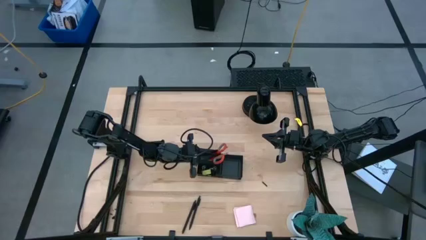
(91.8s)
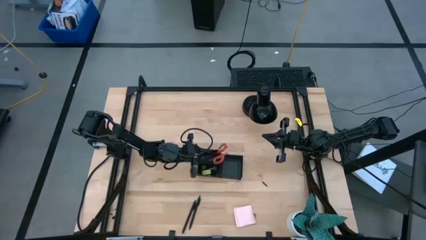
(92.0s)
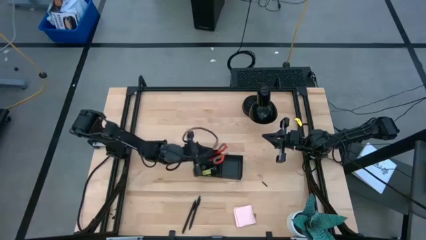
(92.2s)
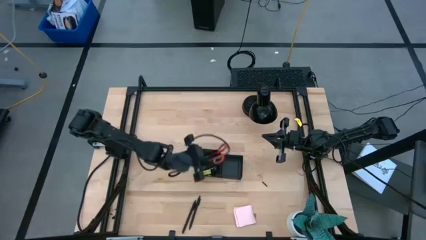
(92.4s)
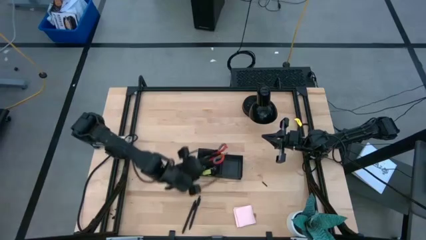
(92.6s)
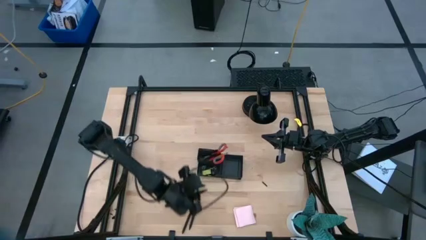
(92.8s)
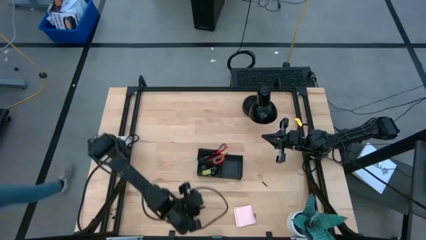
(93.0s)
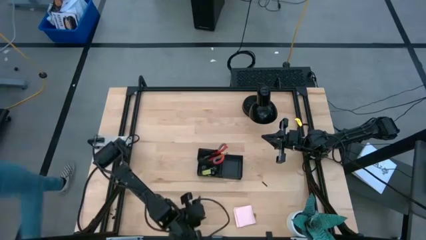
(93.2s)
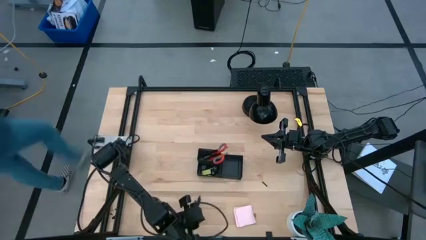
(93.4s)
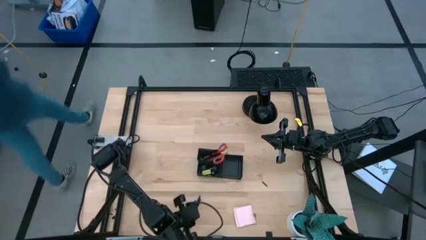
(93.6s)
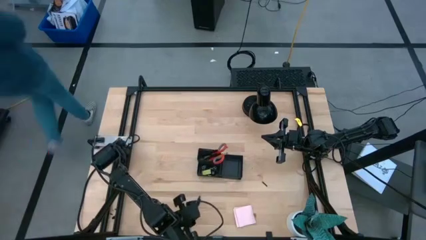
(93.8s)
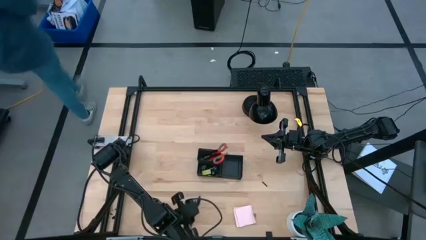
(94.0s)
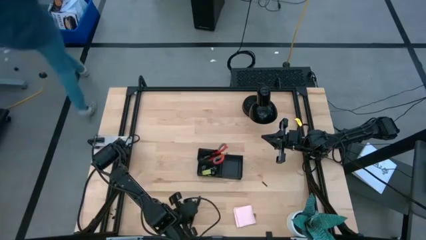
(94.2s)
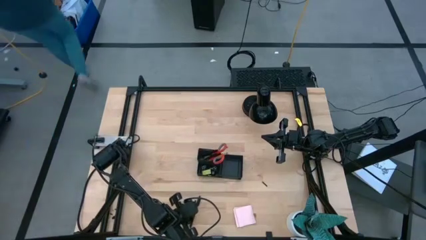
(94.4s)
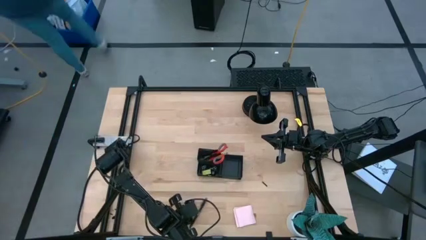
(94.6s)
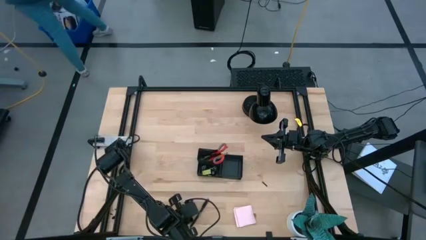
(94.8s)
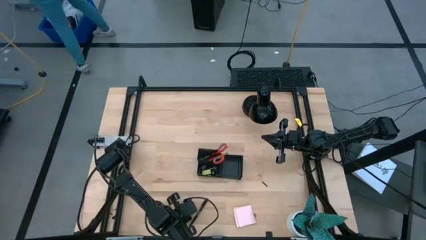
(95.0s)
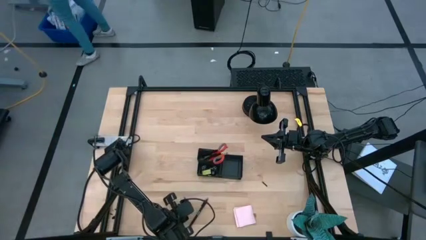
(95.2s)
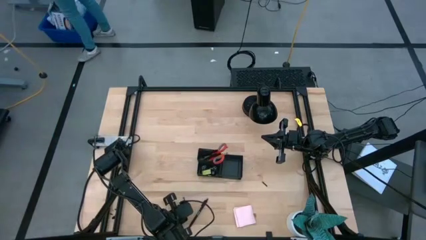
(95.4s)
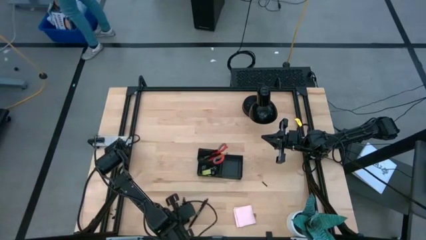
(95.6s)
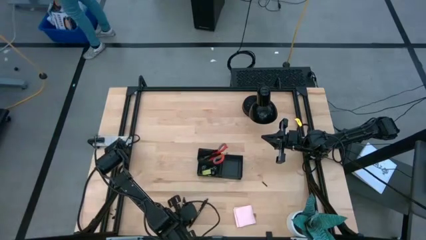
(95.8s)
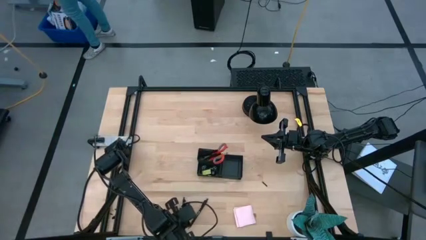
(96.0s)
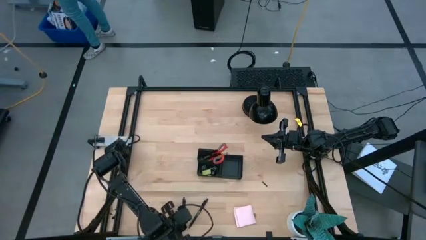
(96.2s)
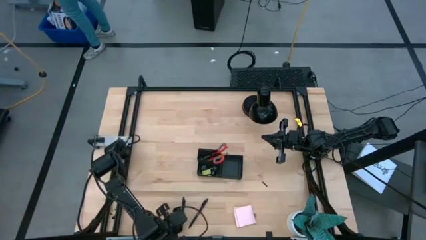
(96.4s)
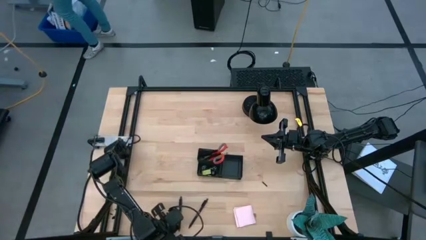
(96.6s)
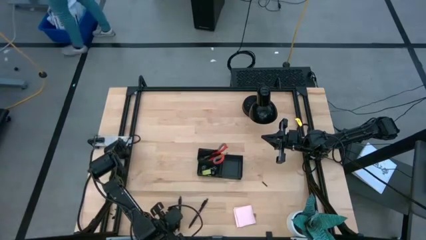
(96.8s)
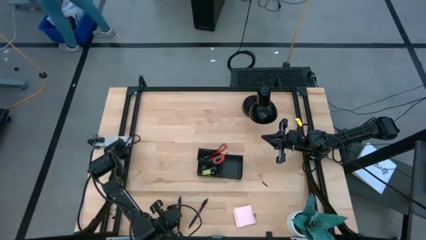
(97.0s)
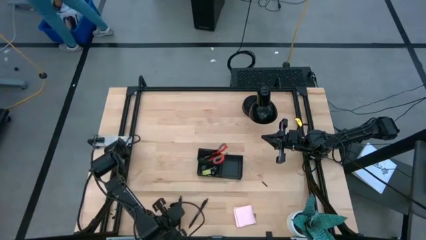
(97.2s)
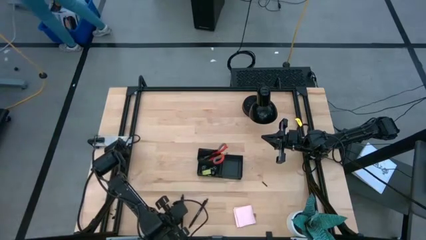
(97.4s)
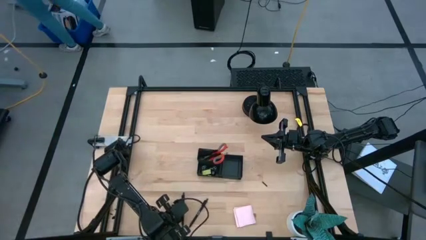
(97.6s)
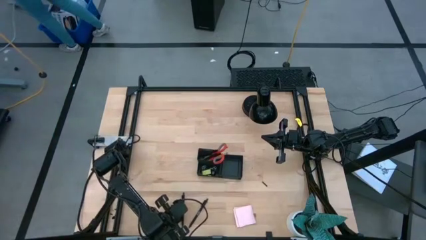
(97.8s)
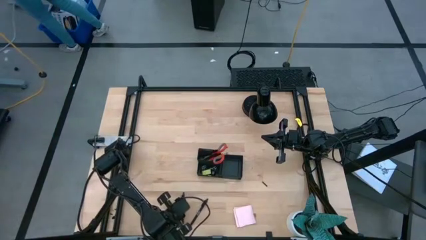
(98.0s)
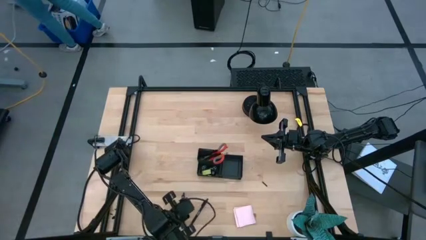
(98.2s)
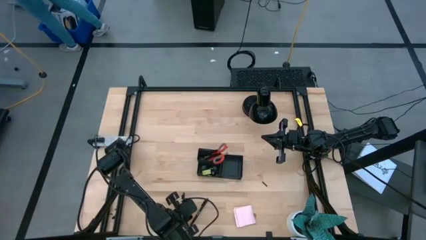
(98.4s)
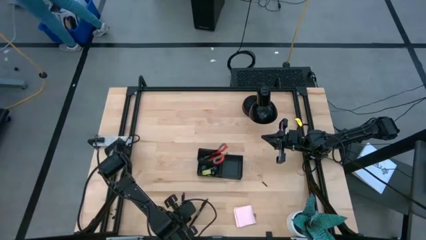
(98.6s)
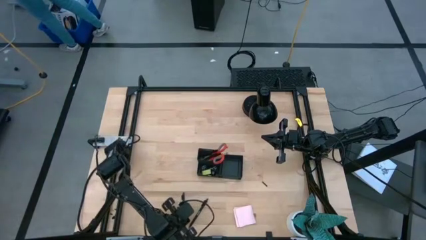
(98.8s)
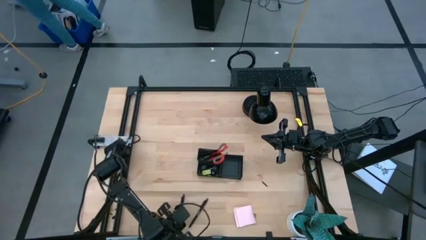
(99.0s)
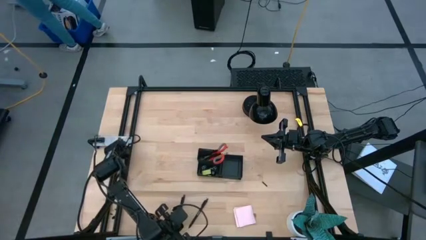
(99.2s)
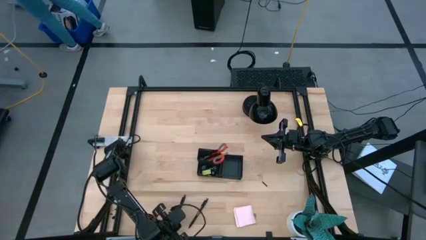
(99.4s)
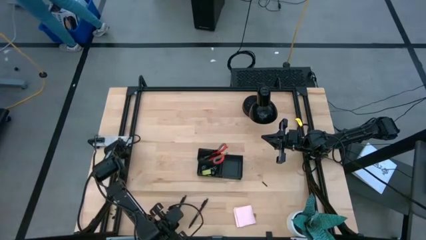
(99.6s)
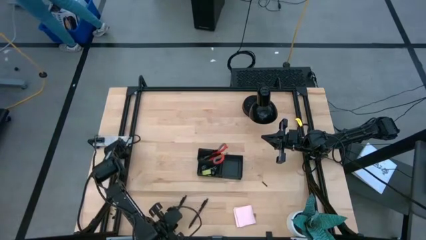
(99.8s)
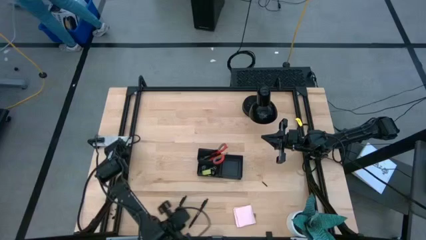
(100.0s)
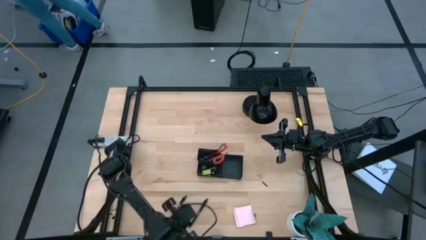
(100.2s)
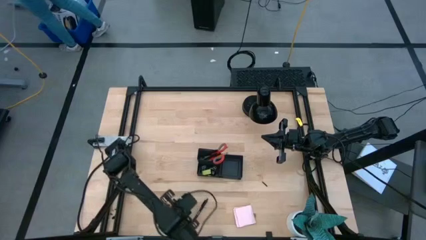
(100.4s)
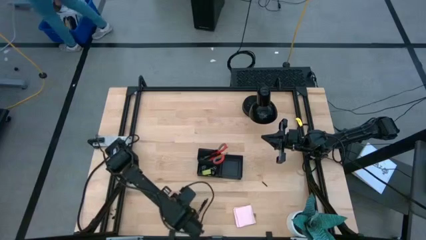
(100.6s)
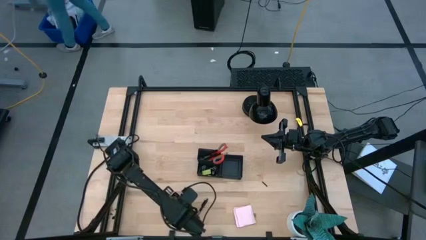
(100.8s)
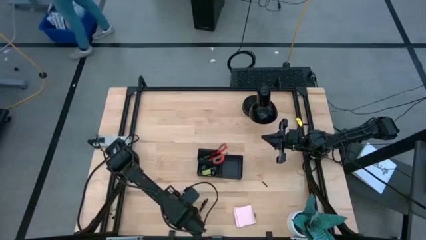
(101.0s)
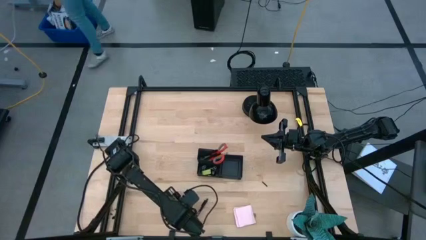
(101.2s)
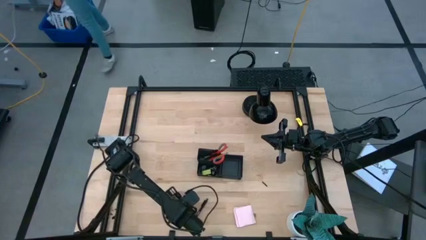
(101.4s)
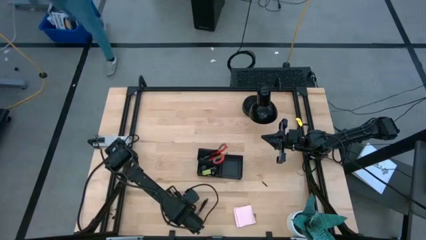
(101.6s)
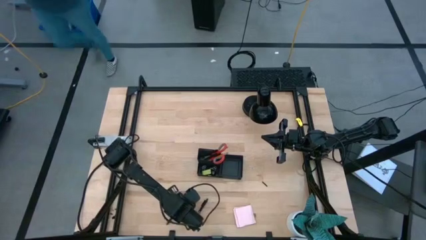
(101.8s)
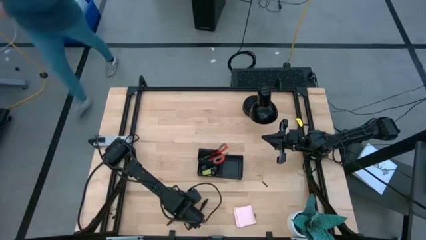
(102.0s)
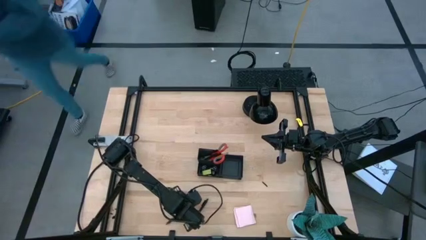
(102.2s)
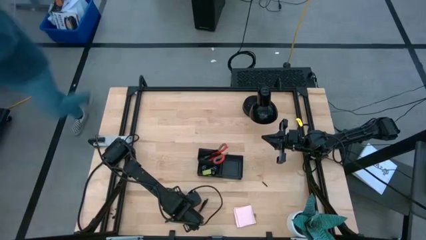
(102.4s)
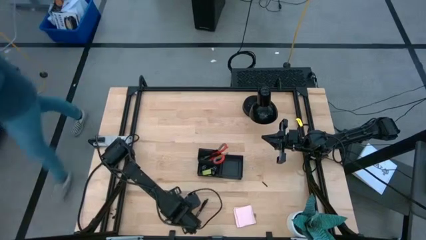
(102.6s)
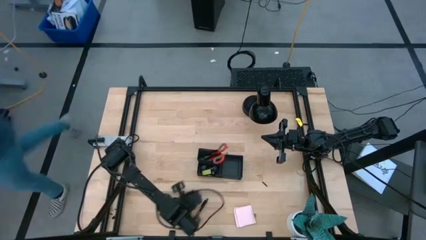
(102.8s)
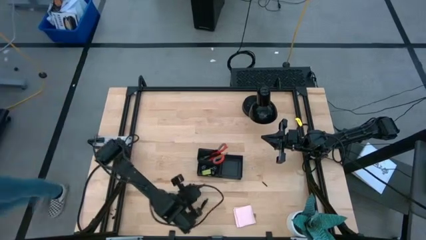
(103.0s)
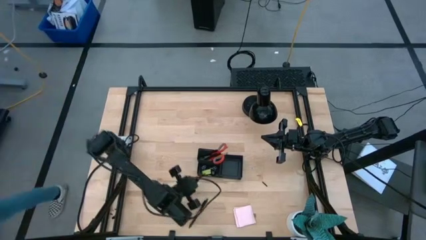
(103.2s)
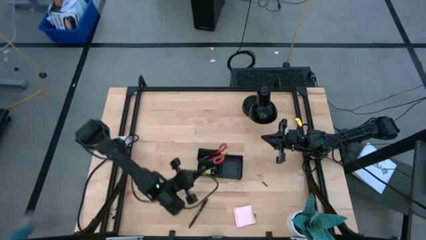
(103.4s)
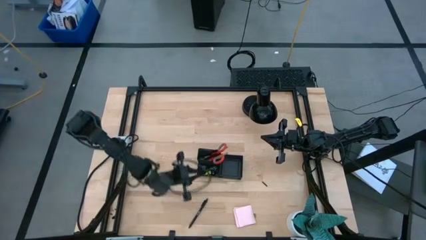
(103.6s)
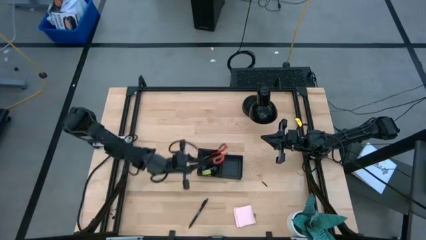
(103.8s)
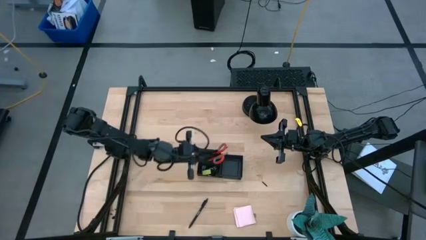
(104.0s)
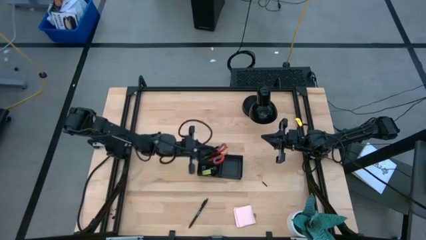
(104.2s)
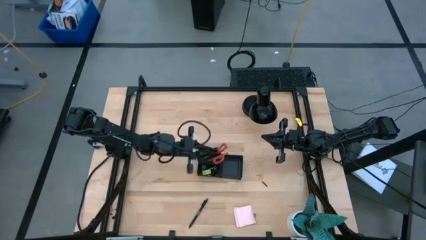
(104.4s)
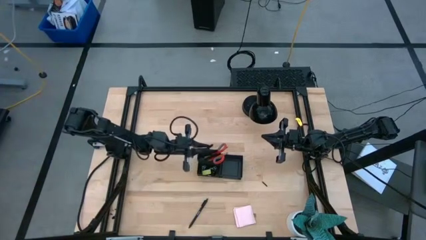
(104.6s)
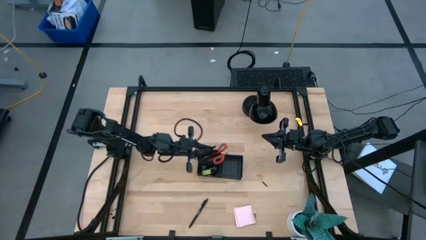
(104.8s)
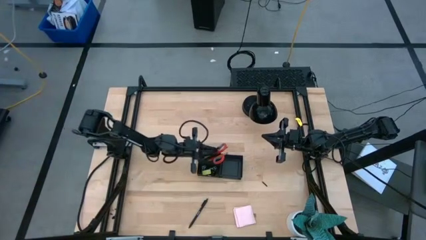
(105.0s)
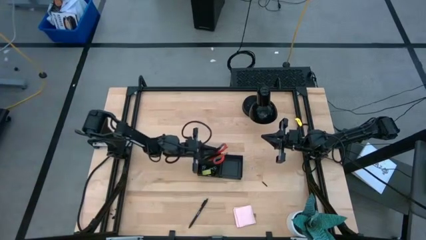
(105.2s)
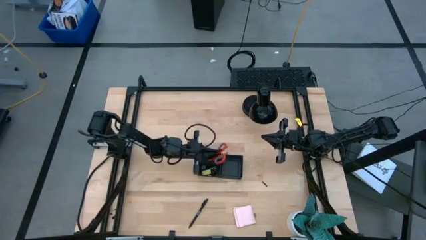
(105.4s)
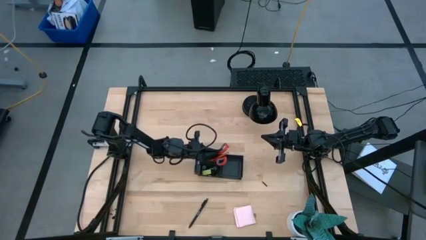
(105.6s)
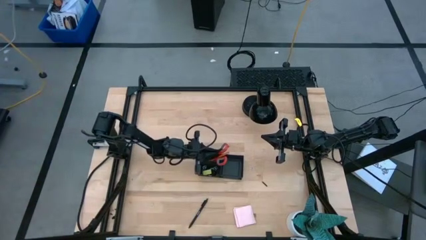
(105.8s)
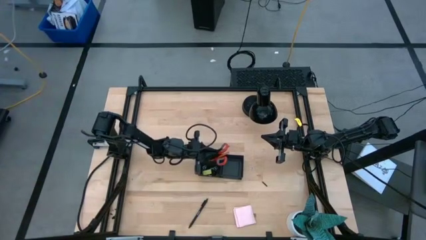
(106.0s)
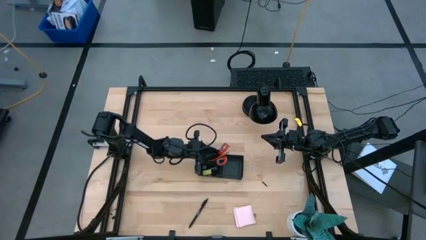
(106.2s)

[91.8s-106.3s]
Task: Pick and place office supplies into organizer
Put the black pen into the black desk organizer

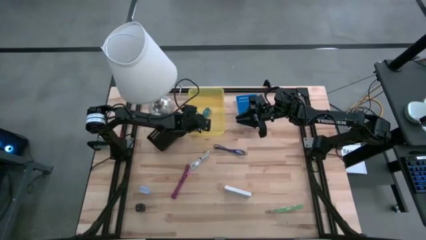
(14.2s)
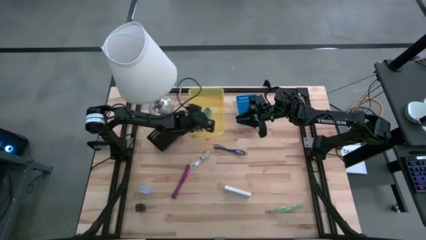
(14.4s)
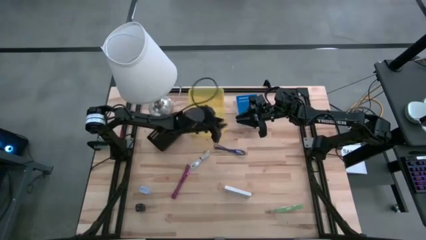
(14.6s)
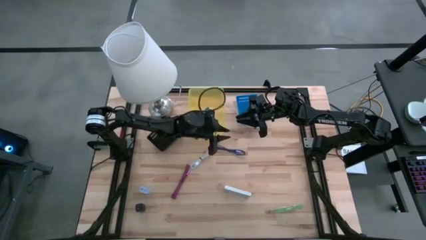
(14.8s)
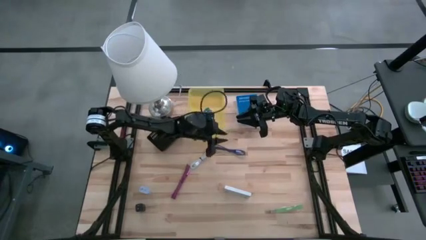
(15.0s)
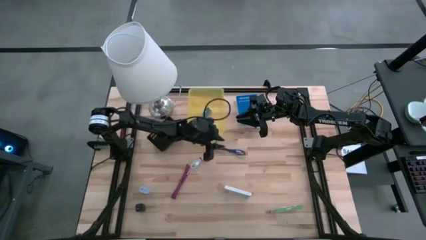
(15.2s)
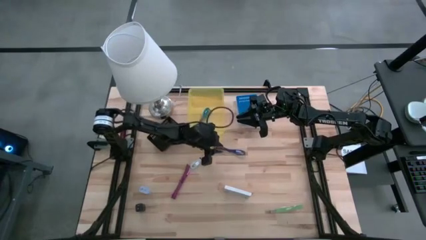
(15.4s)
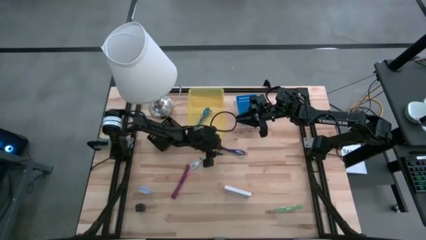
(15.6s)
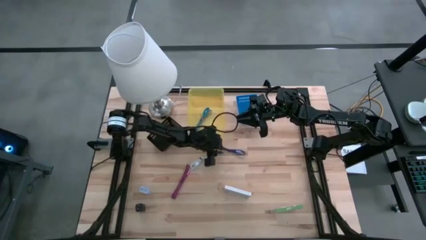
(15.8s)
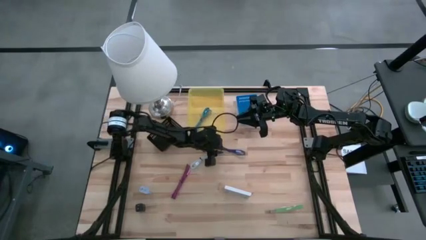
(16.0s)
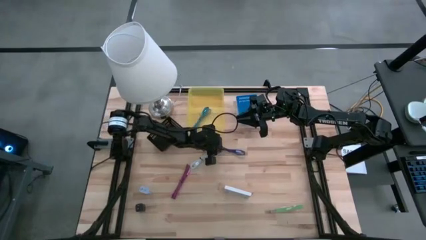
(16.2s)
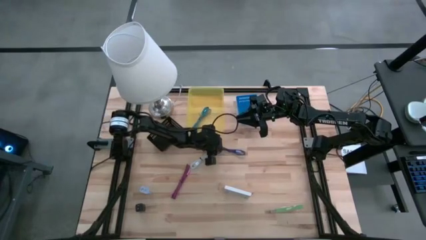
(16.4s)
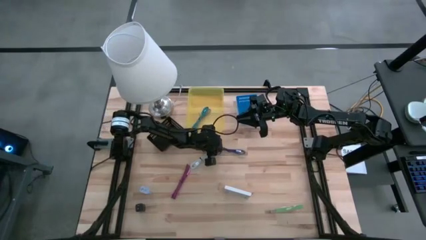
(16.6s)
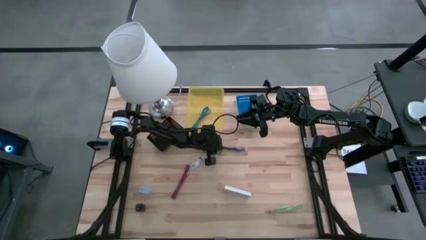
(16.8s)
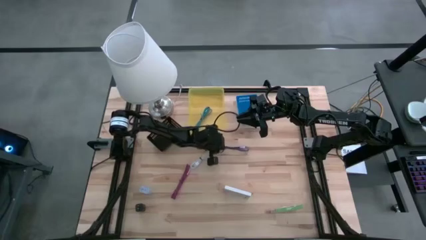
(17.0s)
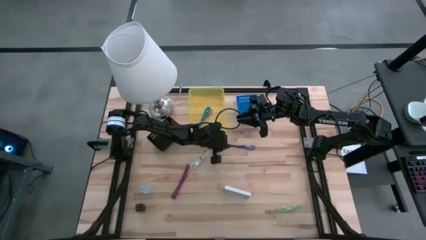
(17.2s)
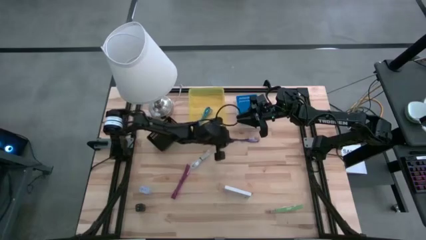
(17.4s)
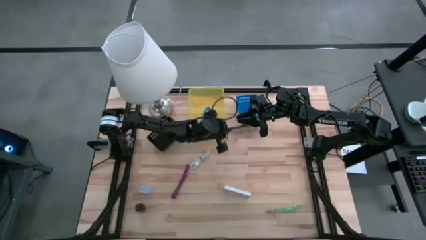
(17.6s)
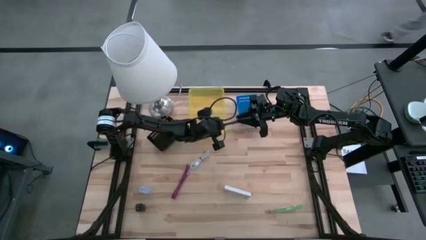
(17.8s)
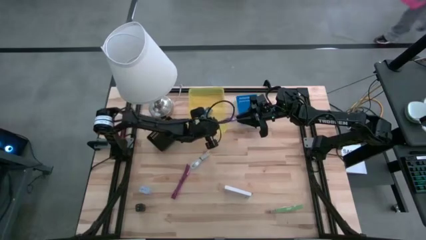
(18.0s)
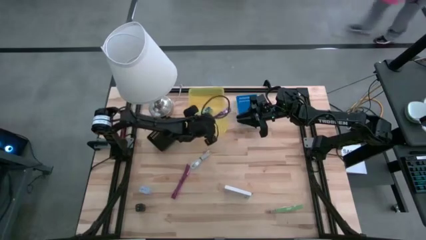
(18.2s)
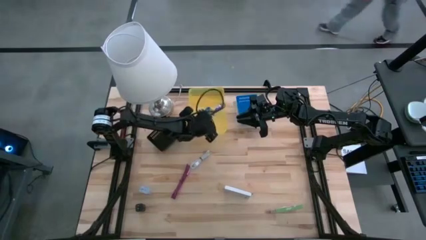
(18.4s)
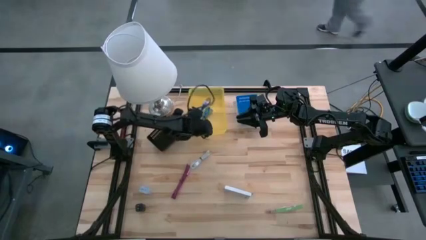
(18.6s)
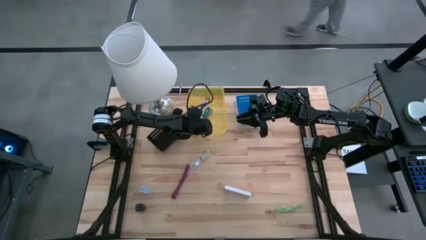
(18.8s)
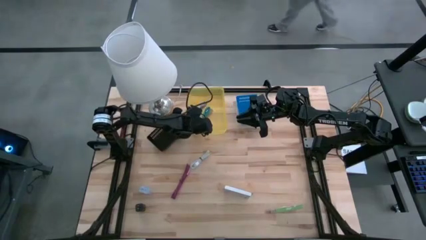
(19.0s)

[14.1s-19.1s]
Task: Pick and place items into bin
Put the violet charger cable into the yellow bin
